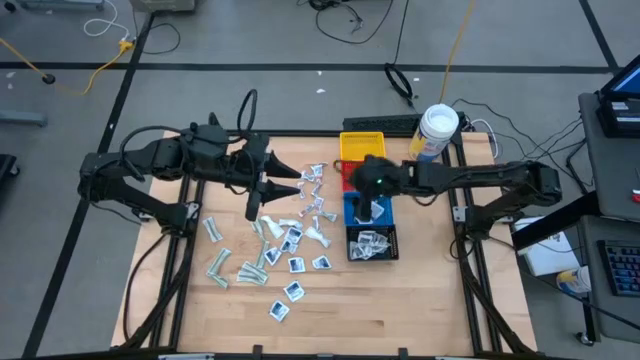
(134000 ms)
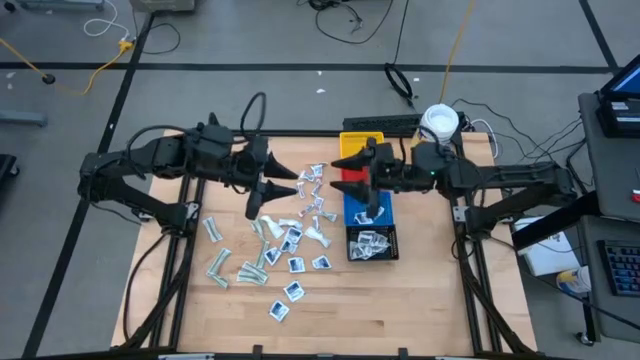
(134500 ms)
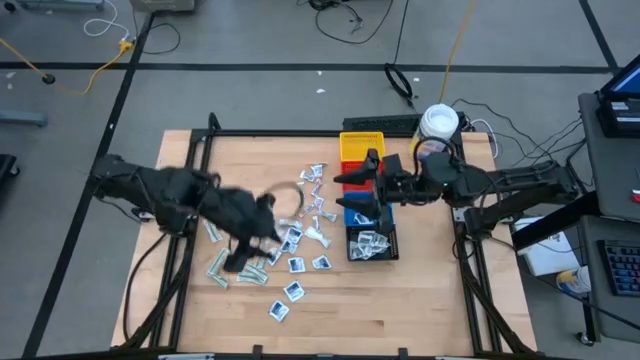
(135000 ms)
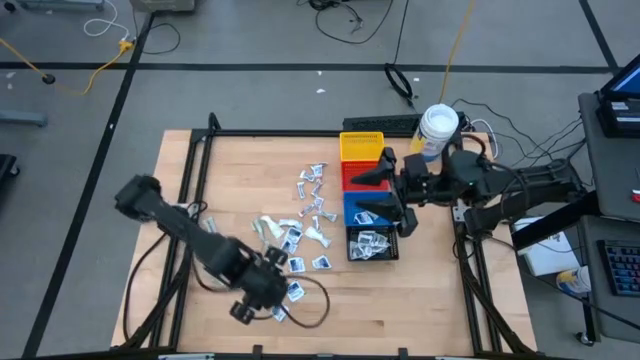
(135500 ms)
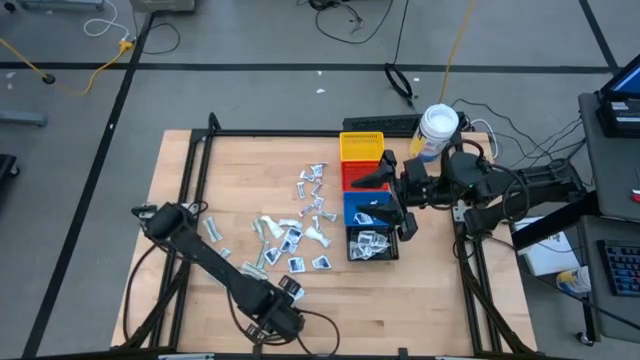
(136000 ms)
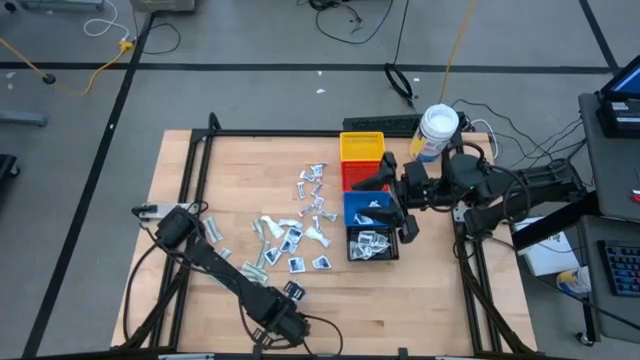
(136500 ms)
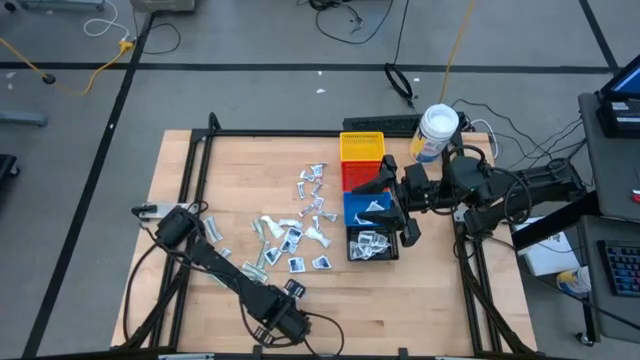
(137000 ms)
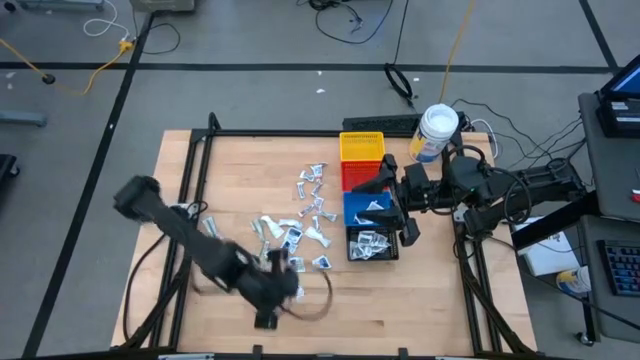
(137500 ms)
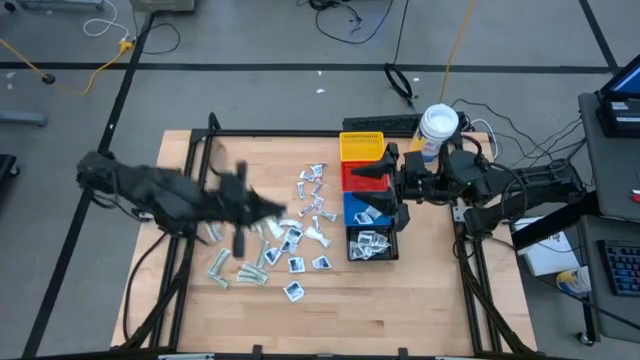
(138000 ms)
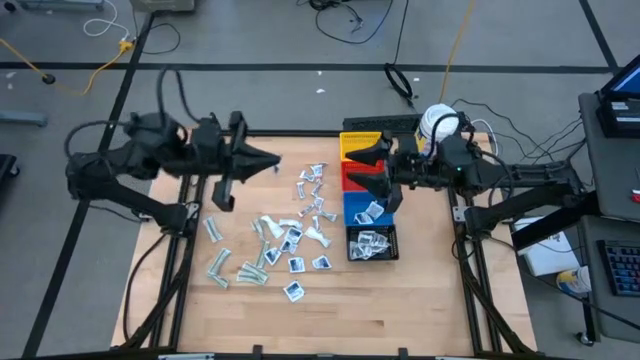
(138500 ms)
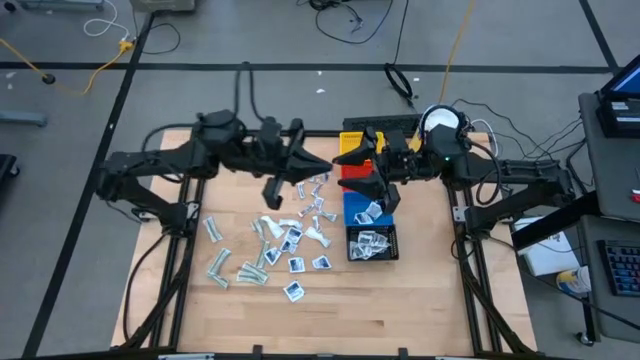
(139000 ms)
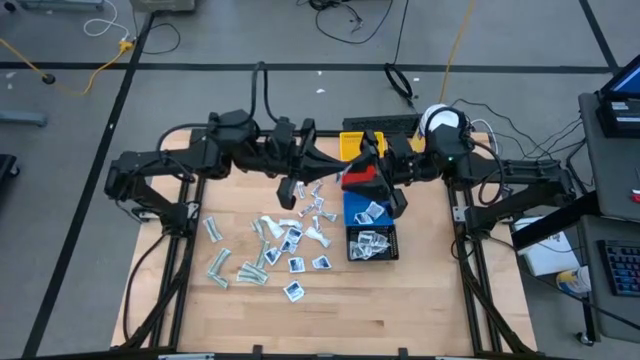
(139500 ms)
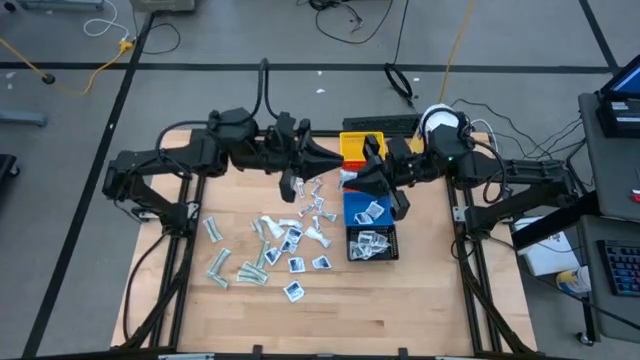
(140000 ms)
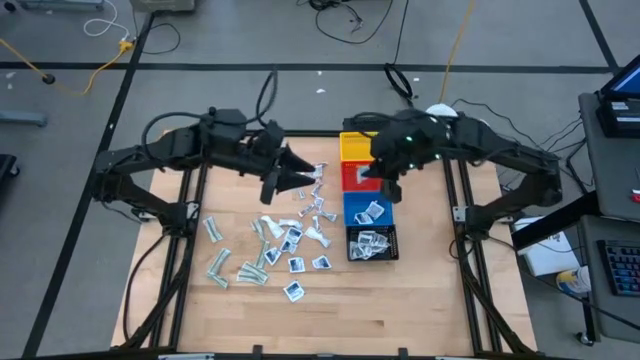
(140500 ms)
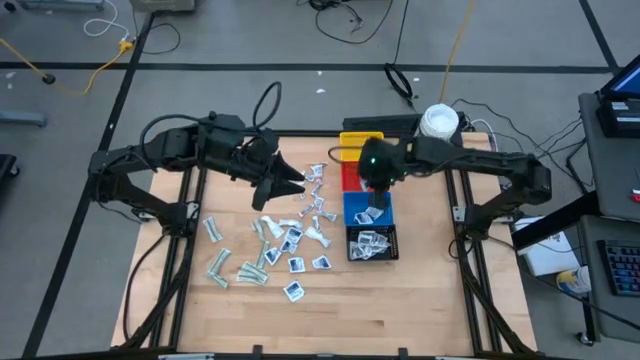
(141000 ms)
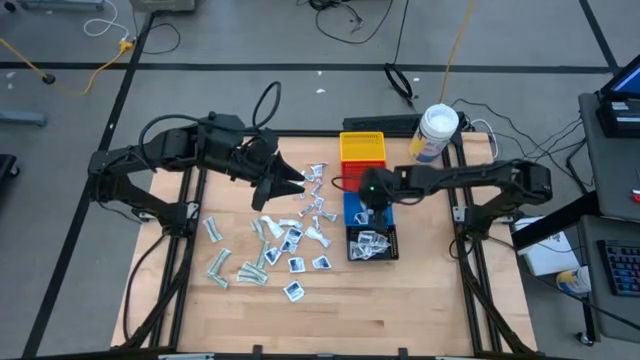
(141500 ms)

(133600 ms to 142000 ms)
Task: Pick & Place First Aid Supplies
Put the blue alcohol pad into the blue bin

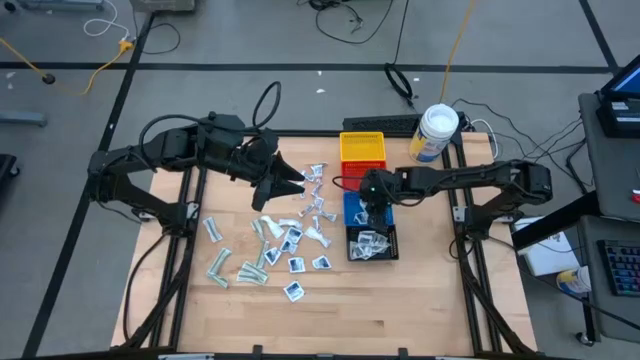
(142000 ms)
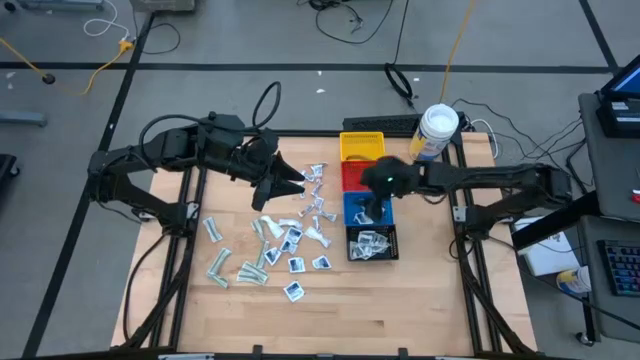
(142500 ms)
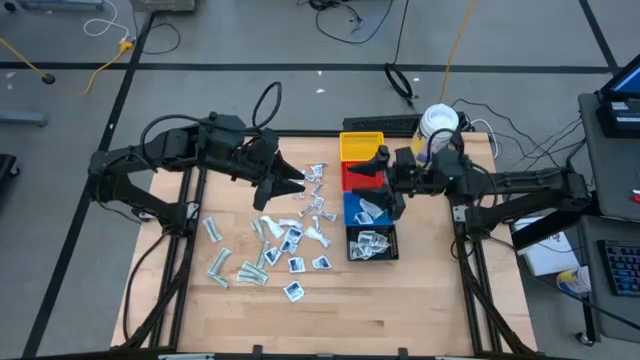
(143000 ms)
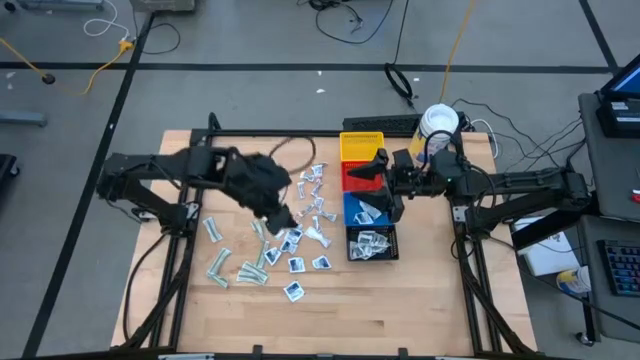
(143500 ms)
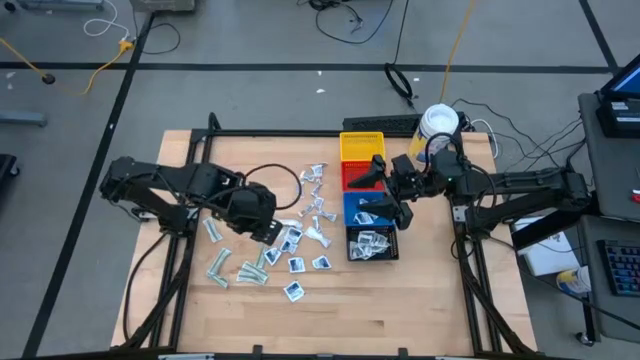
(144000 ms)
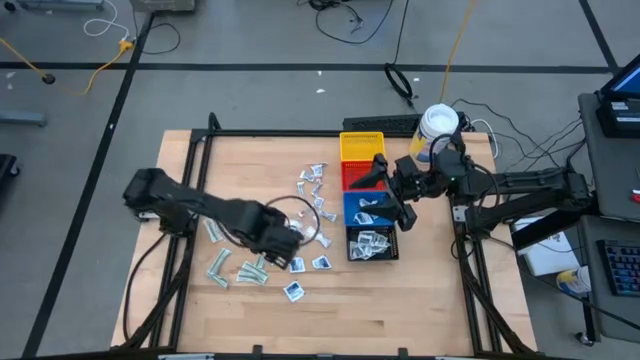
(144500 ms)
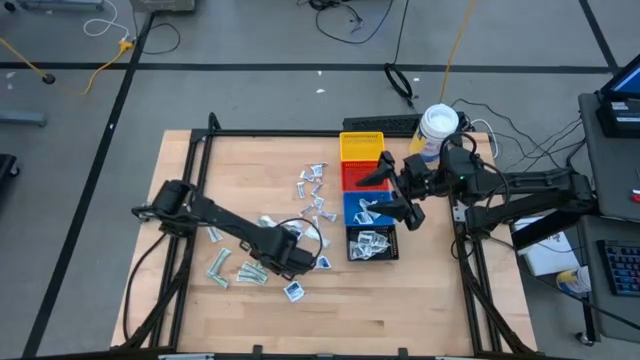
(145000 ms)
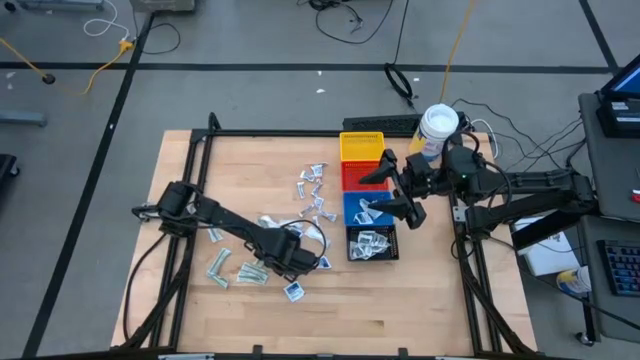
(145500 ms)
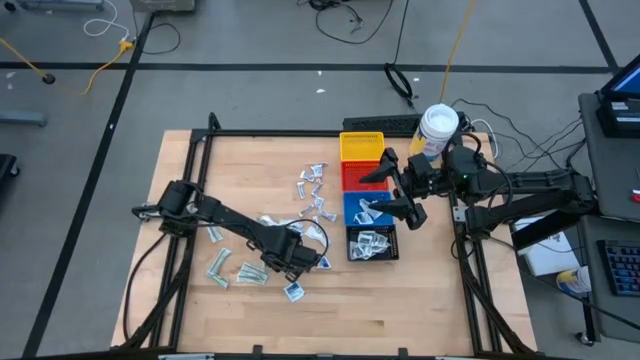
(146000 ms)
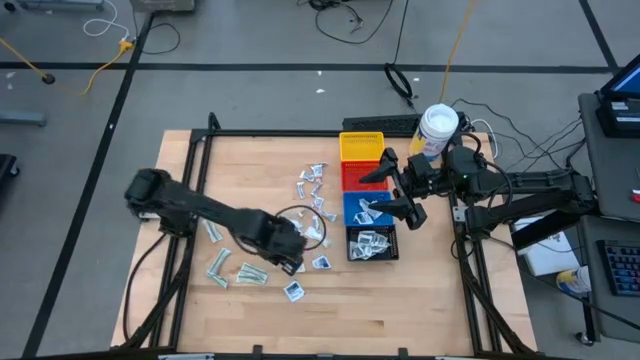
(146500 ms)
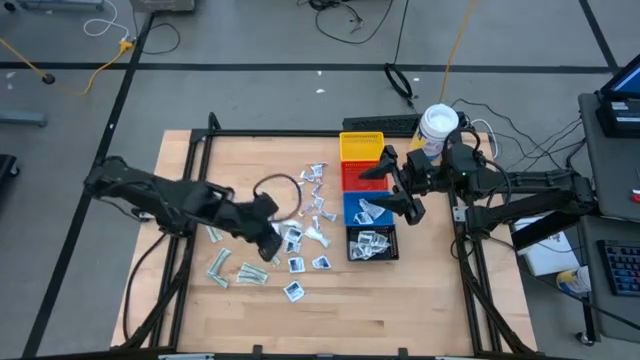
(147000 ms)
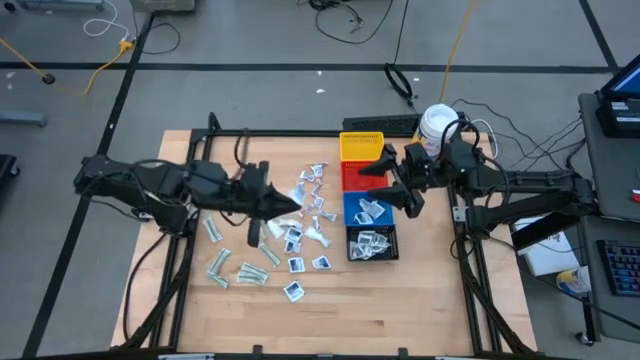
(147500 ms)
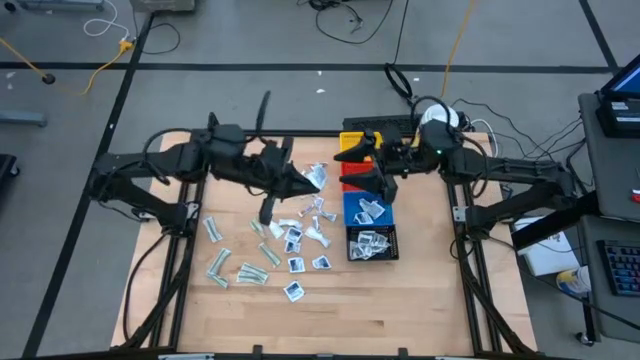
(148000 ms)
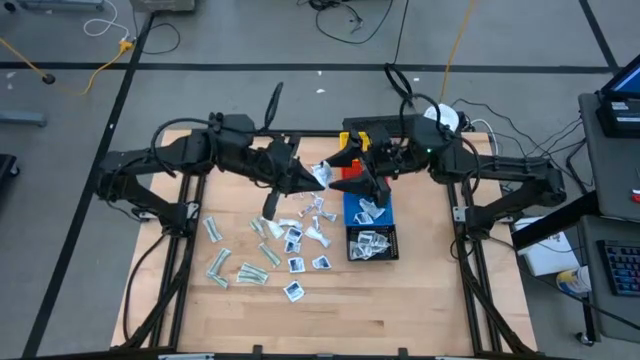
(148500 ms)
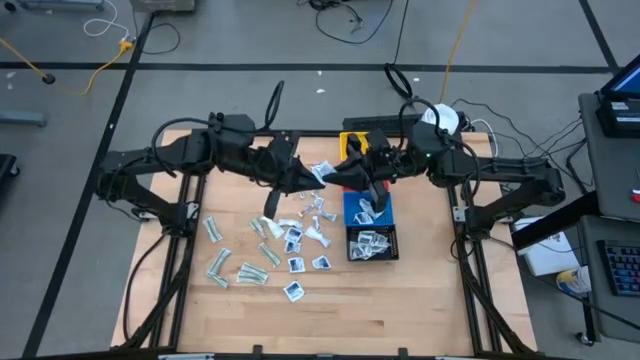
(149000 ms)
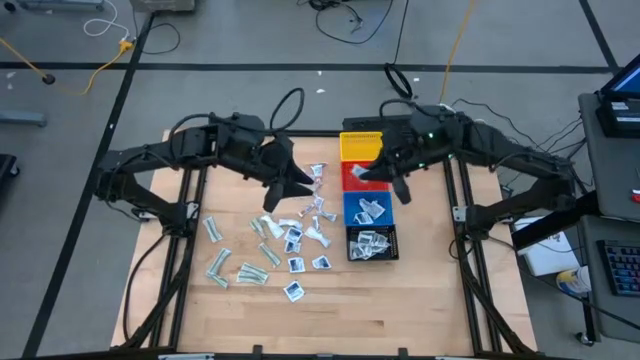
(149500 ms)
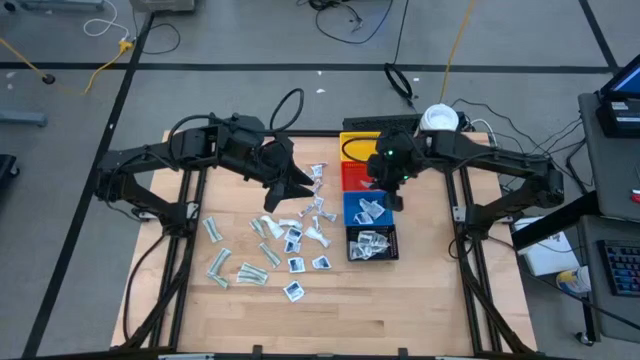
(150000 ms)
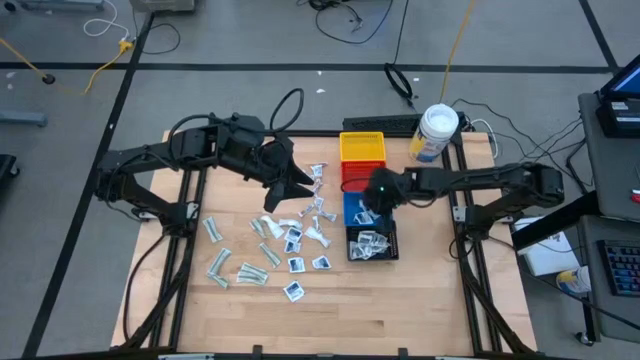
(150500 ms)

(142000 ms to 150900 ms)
Put the blue alcohol pad into the blue bin

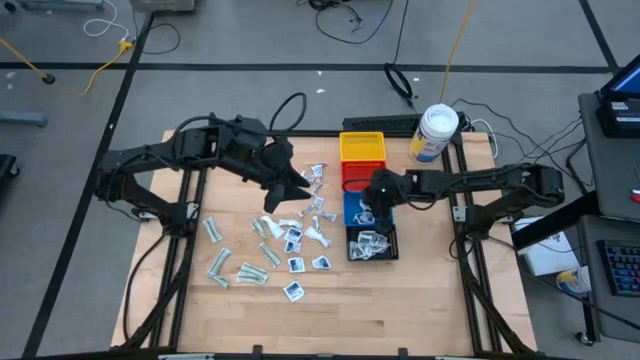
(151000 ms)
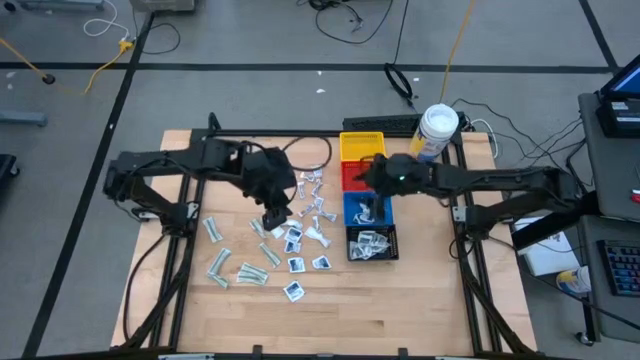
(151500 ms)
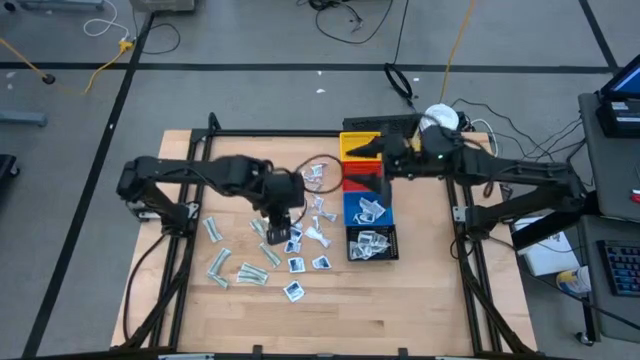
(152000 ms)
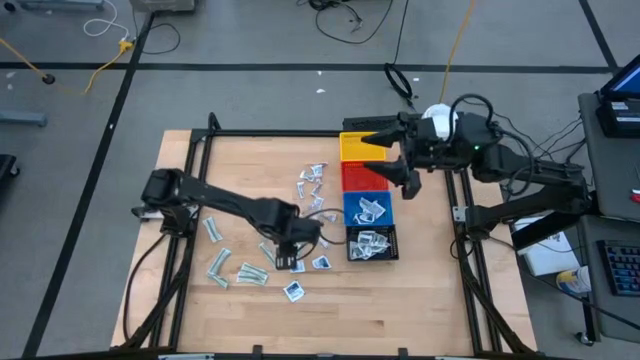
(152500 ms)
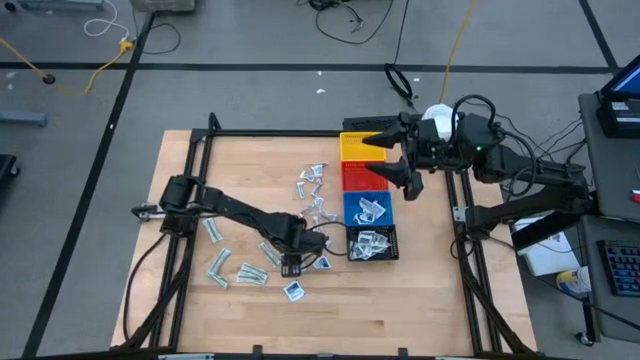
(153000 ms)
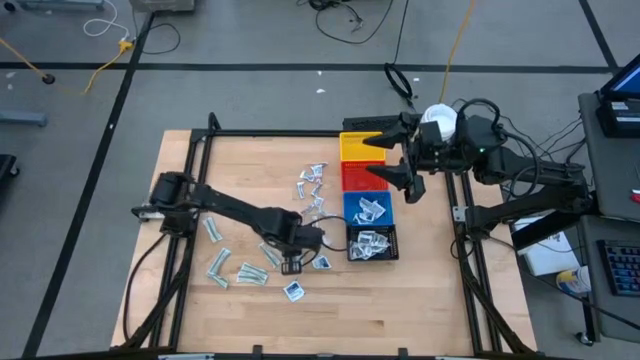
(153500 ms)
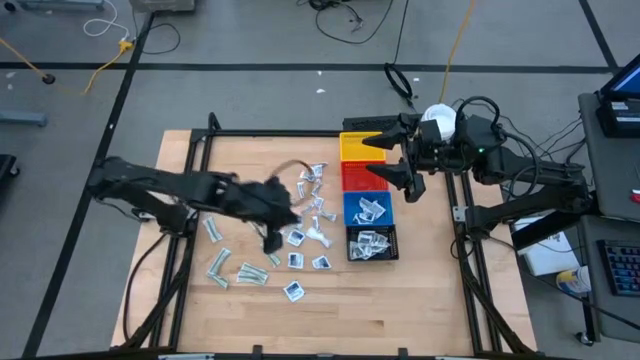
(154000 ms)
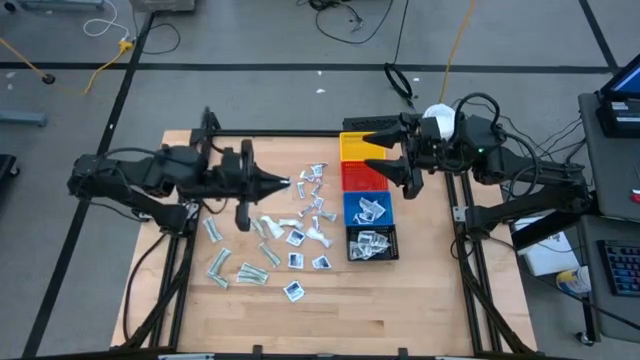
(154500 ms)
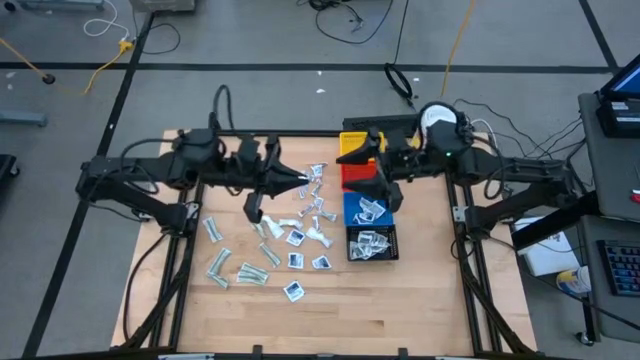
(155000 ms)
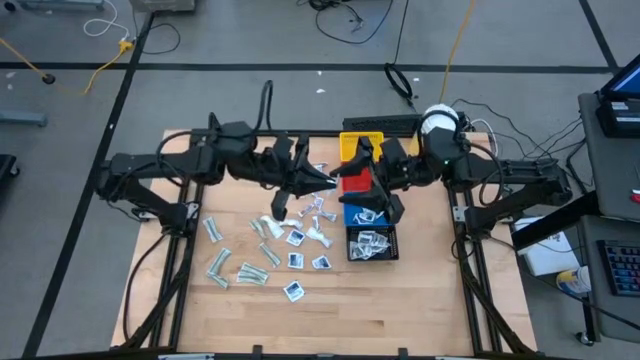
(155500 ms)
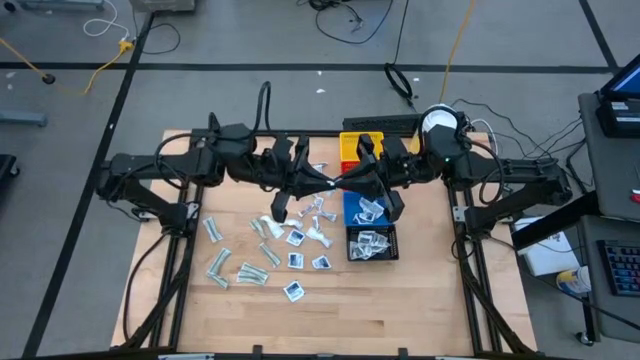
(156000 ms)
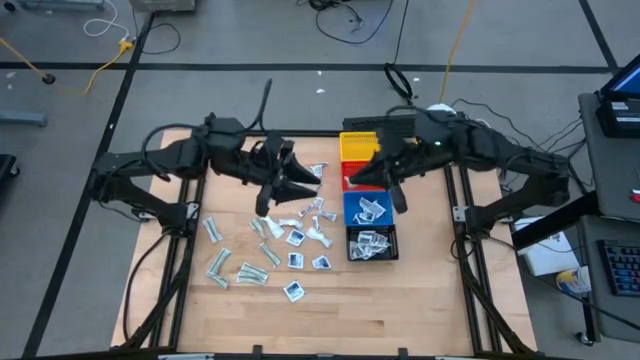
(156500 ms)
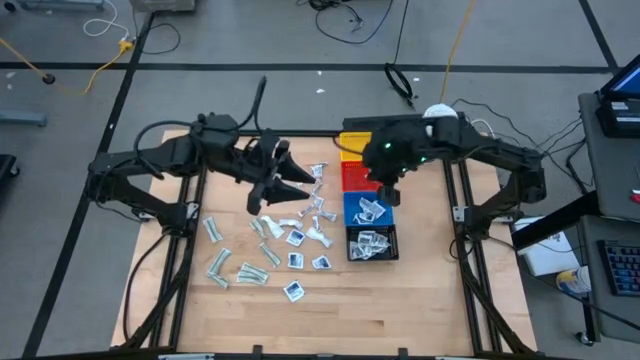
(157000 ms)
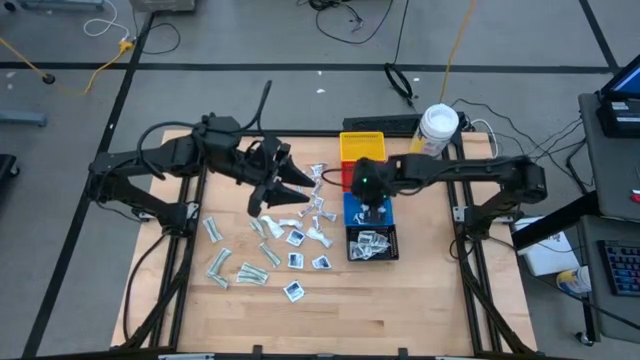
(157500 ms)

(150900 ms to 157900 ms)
Put the blue alcohol pad into the blue bin
